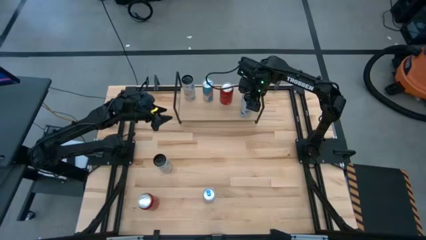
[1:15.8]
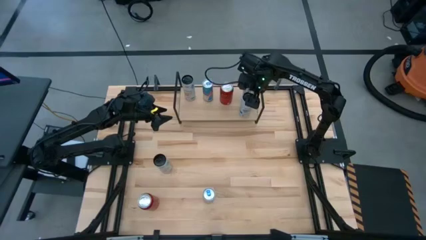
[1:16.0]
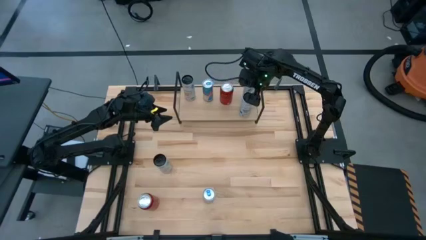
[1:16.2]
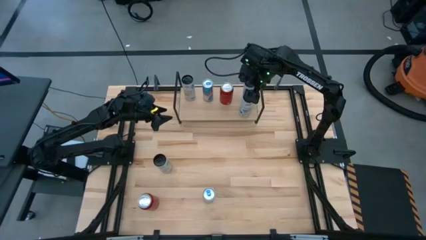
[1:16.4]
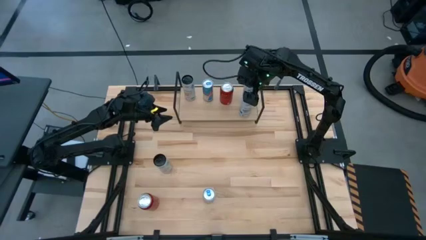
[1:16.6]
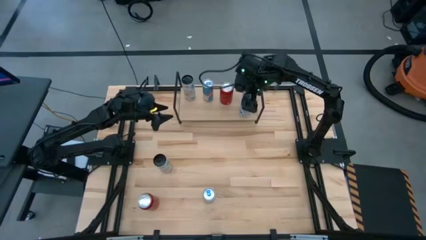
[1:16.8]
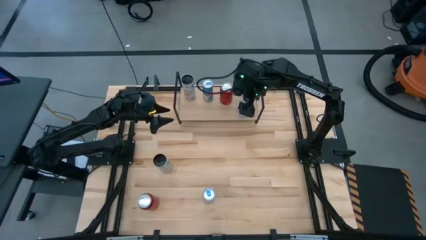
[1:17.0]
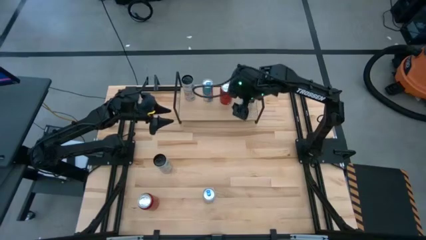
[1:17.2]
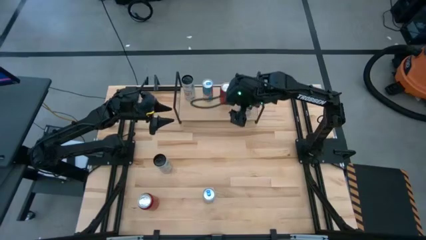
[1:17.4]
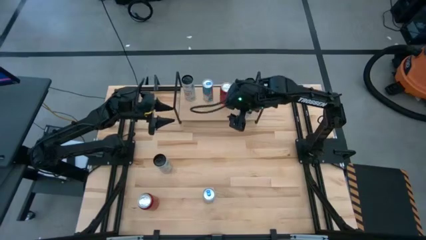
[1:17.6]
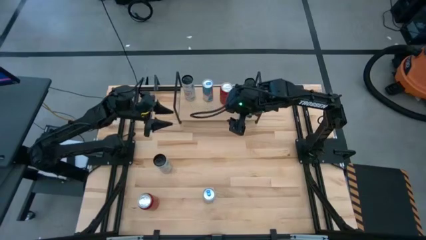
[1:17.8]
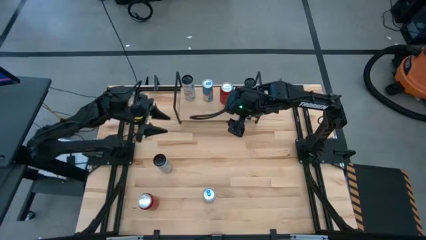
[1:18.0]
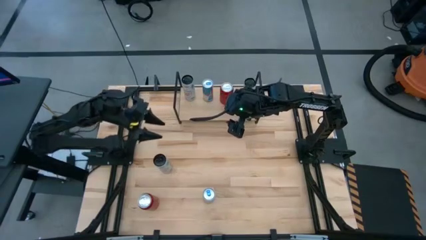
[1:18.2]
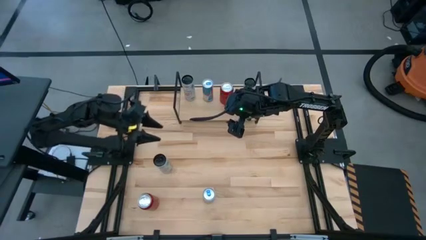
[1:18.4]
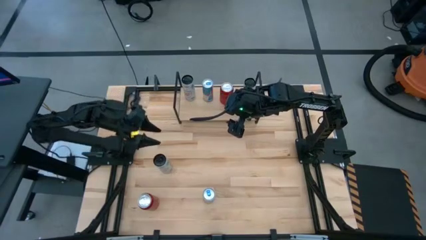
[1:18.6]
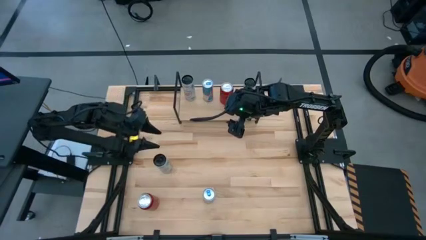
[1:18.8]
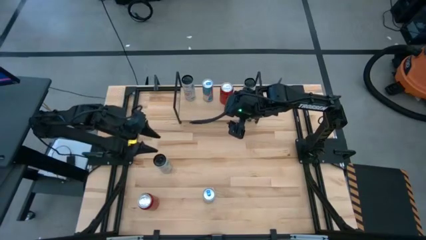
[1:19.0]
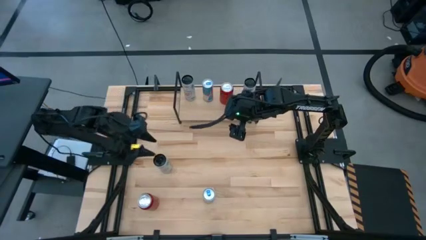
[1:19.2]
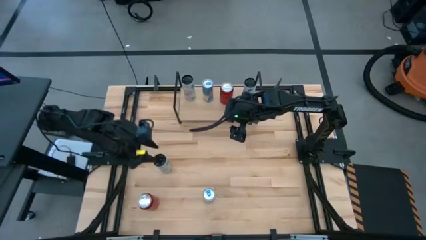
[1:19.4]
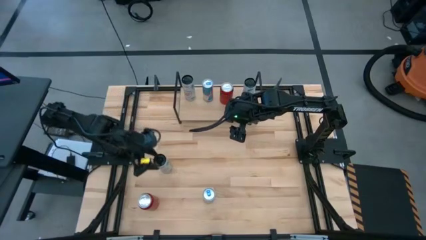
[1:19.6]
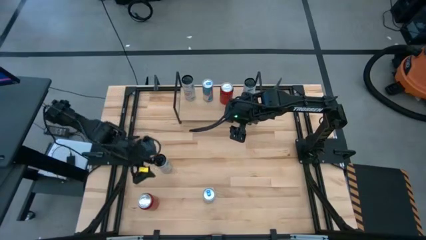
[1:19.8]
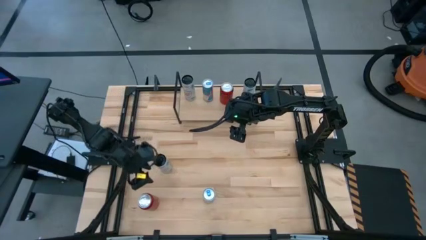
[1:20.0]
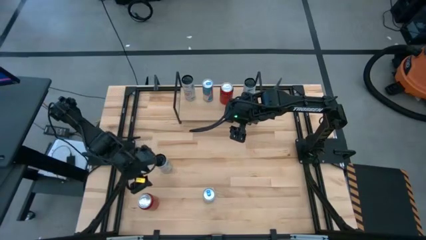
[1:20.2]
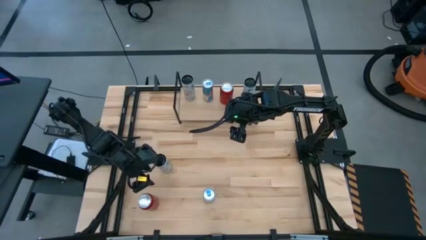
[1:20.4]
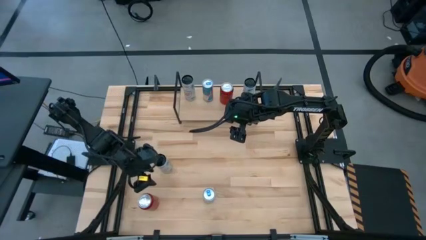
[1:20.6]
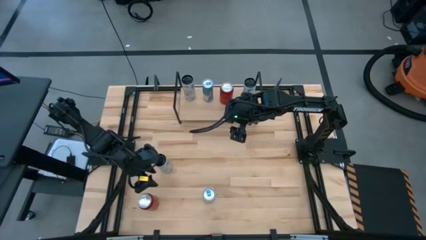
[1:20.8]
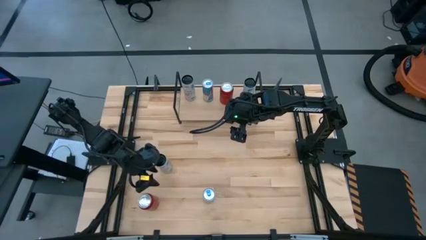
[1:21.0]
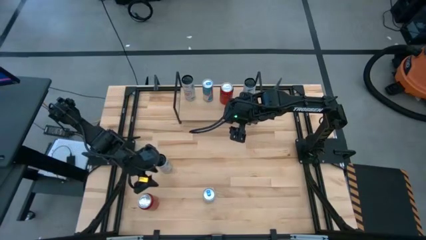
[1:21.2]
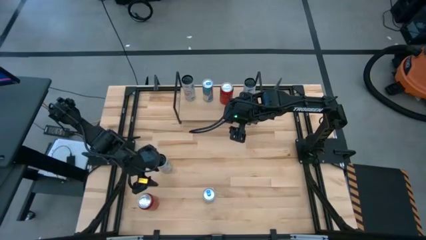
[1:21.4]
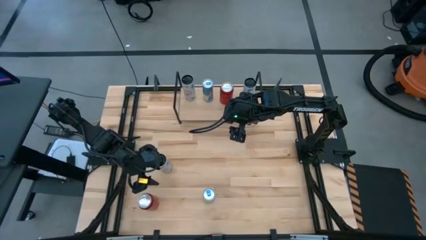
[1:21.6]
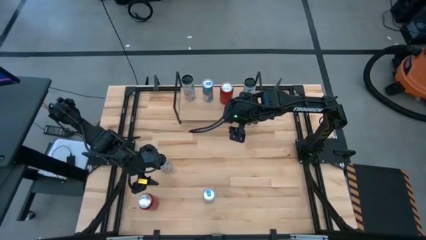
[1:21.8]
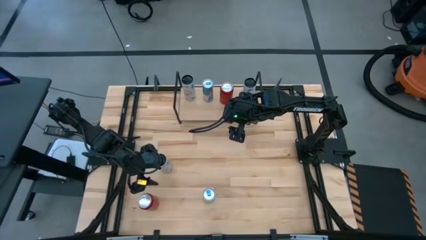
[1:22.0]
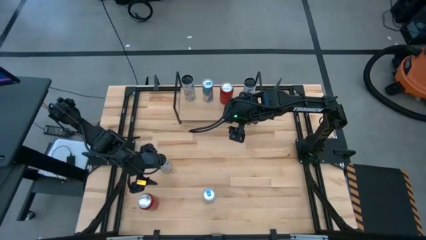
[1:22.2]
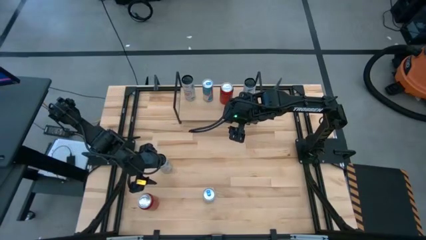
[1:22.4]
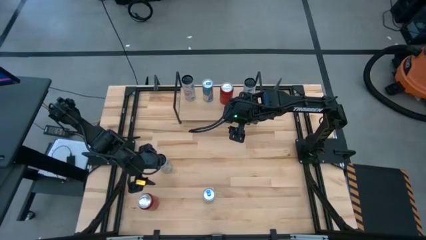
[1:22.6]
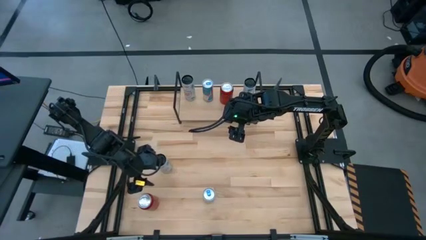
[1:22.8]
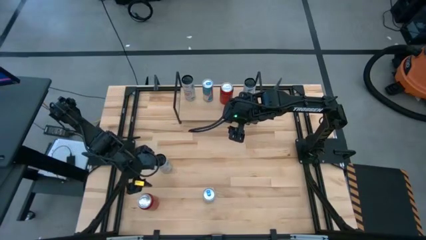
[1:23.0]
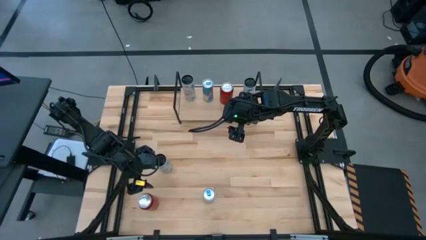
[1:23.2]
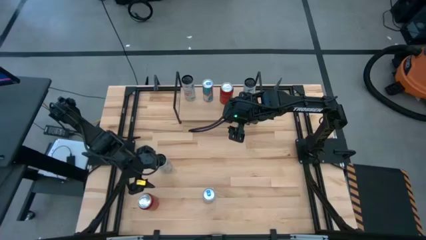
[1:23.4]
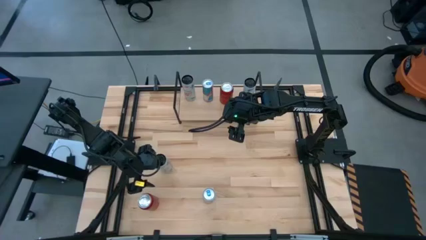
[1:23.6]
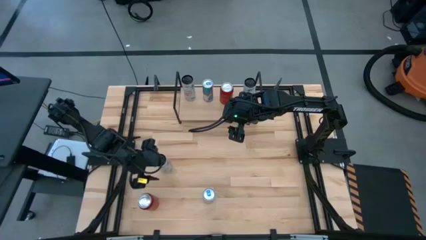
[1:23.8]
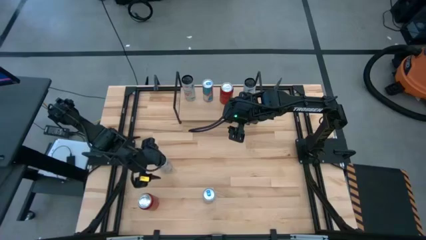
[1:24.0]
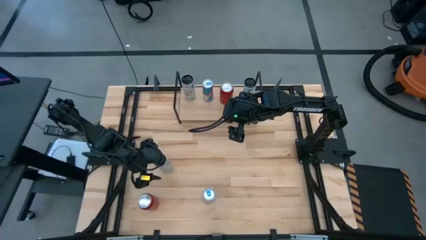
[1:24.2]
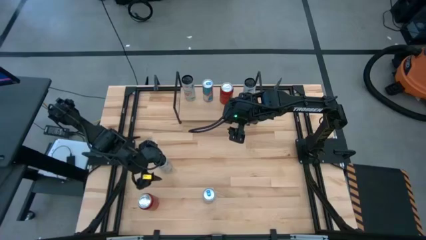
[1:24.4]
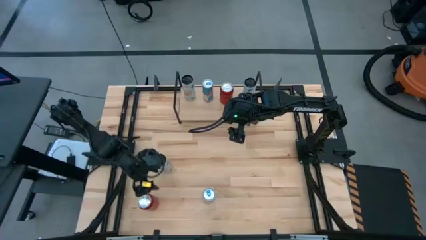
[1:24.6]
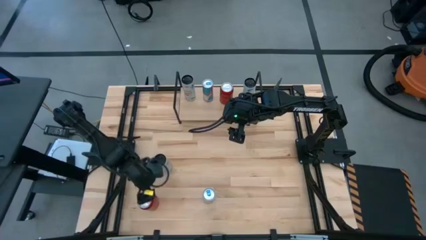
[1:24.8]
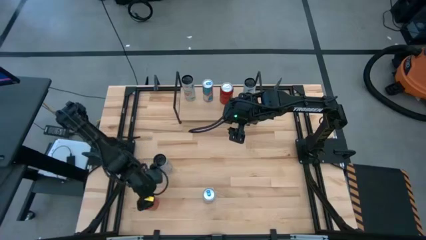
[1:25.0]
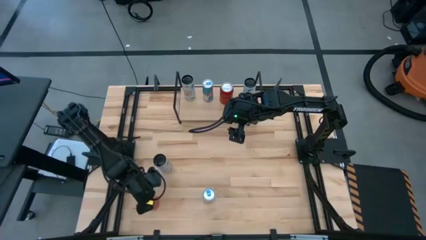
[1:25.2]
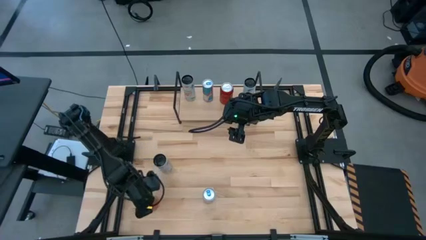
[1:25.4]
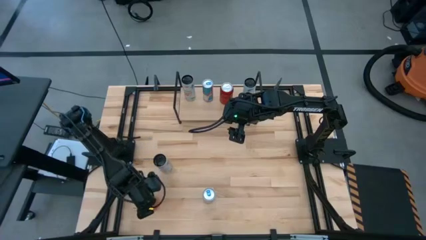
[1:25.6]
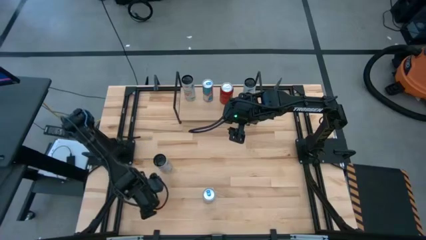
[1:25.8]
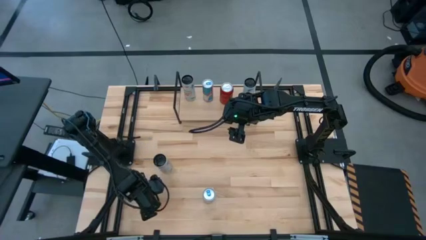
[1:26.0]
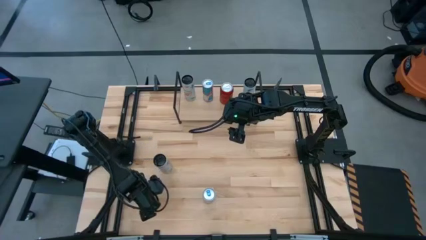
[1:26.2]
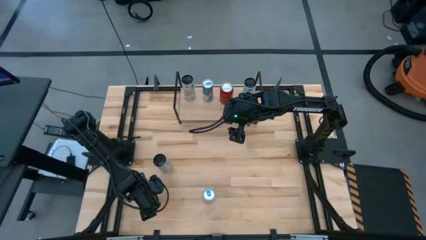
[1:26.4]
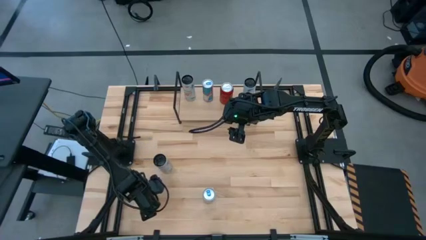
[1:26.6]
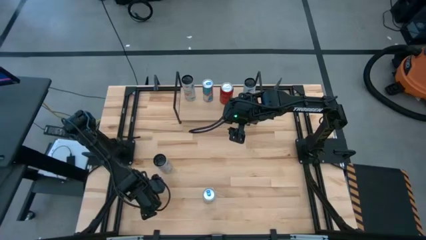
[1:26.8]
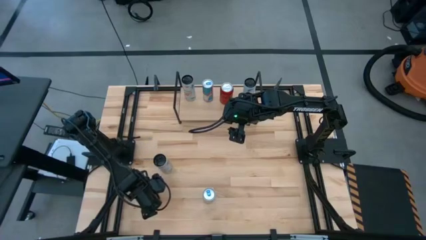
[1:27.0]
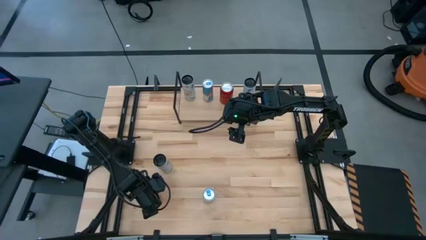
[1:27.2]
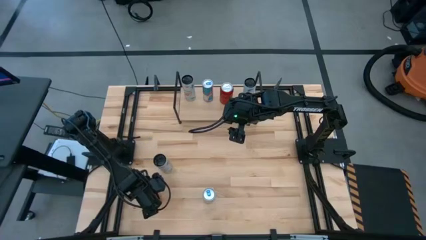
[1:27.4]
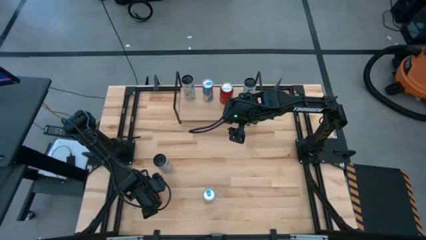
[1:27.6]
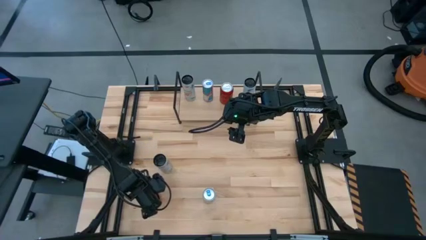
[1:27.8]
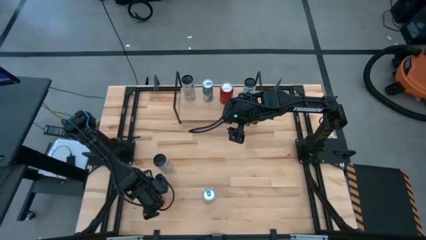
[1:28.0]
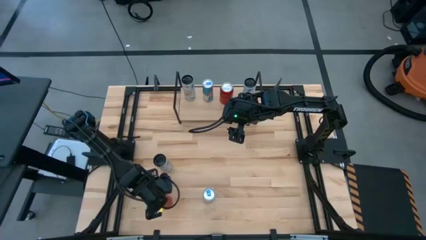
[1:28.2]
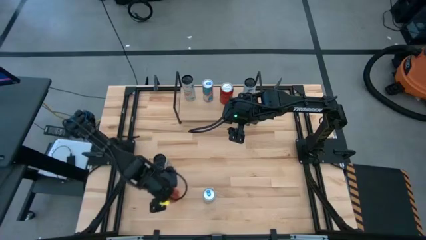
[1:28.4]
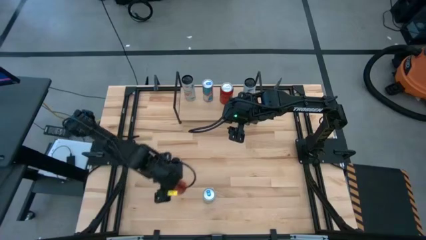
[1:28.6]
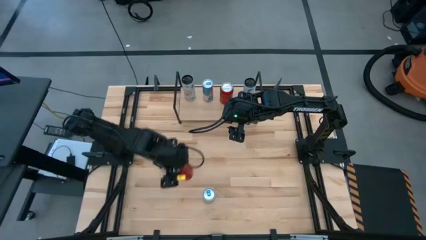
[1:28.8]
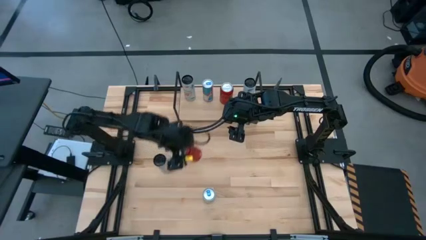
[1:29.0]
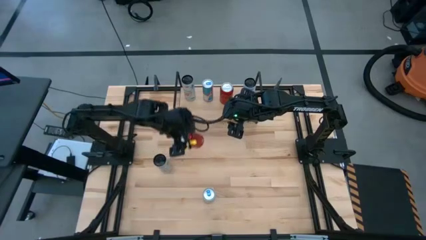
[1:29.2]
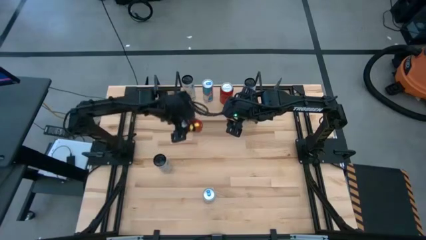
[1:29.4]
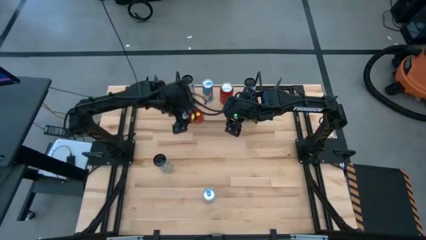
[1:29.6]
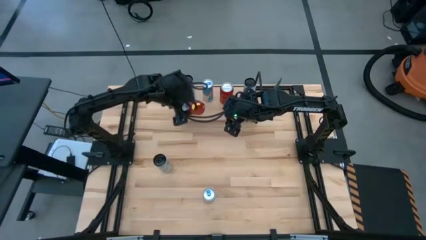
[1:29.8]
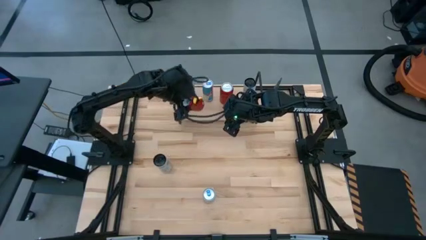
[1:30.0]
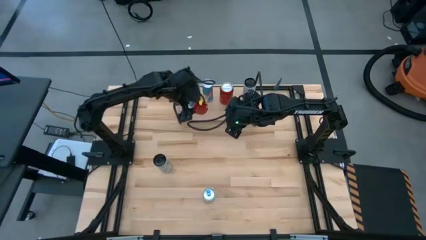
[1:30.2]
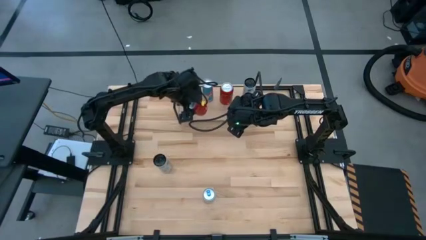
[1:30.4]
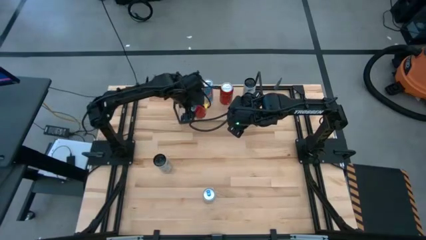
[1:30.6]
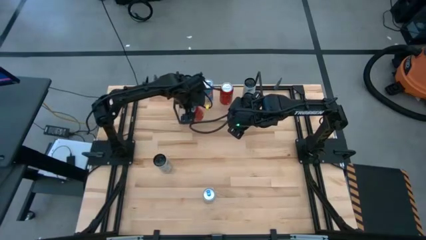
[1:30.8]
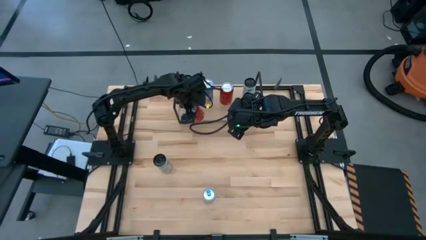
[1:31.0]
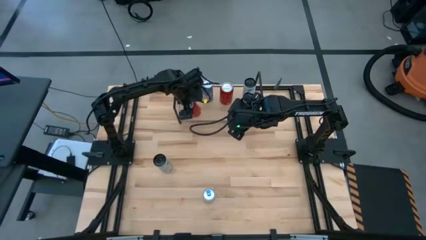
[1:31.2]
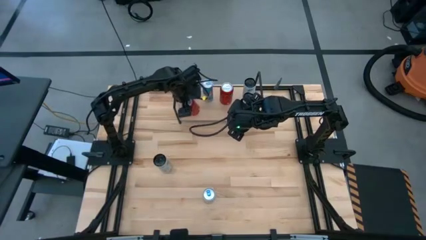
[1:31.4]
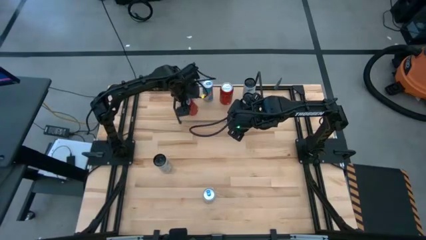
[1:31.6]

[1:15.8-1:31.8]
Task: Place canned beverage on shelf
Align the red and black soda can with the red and black soda can on the shelf
